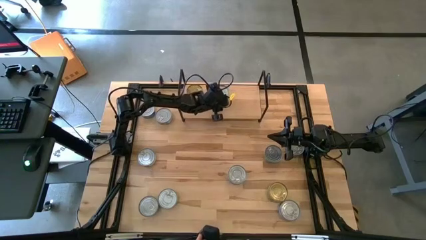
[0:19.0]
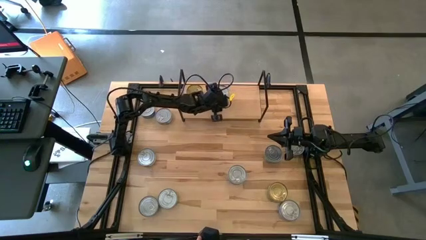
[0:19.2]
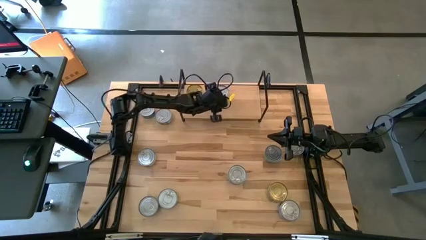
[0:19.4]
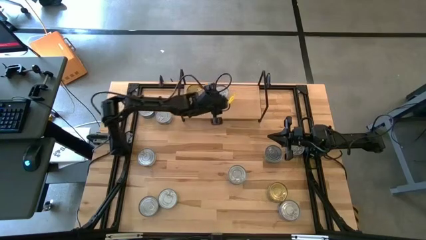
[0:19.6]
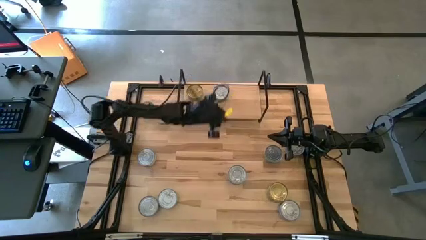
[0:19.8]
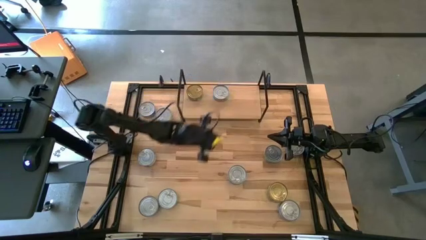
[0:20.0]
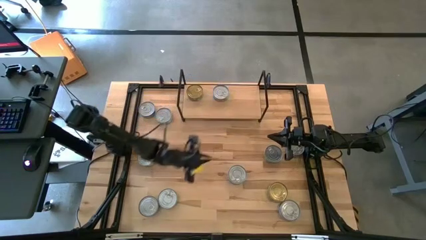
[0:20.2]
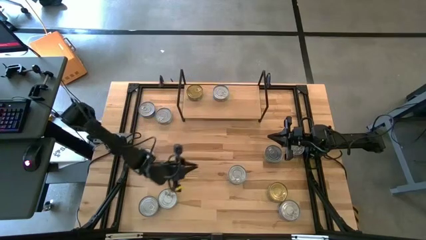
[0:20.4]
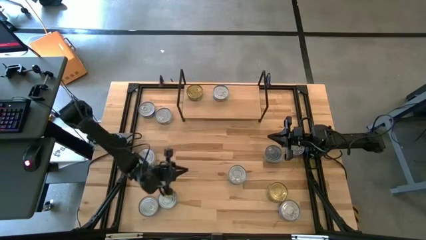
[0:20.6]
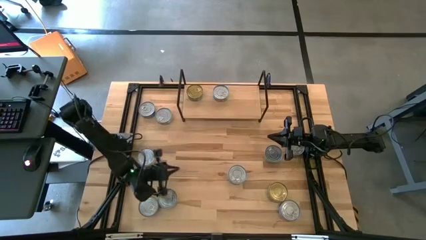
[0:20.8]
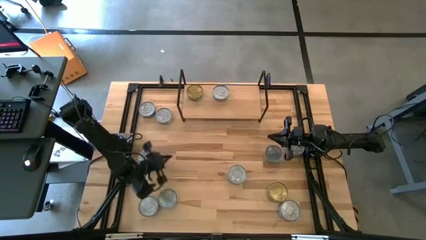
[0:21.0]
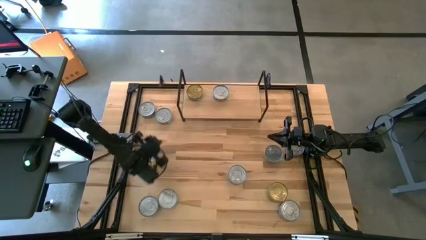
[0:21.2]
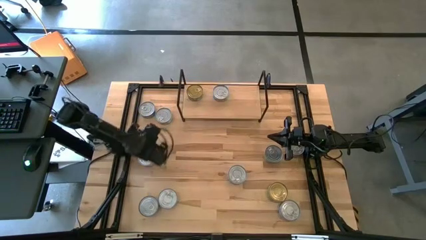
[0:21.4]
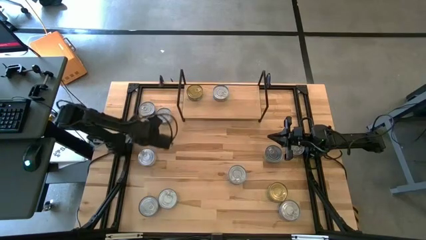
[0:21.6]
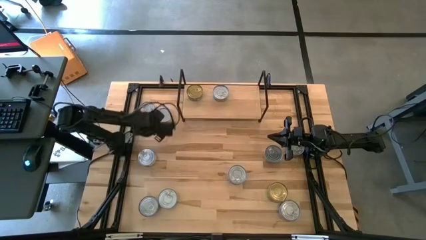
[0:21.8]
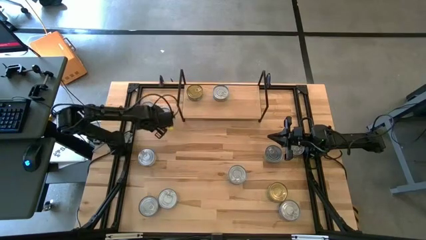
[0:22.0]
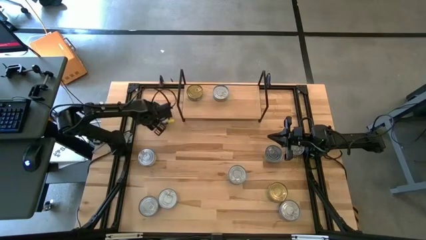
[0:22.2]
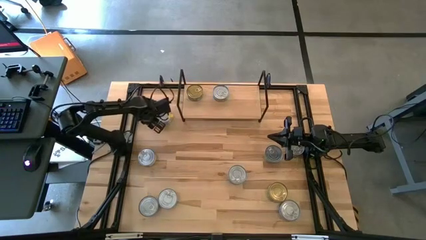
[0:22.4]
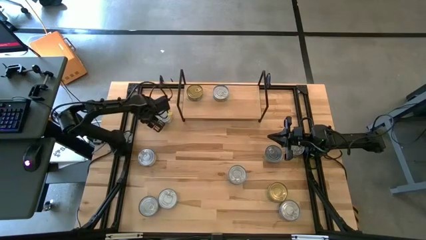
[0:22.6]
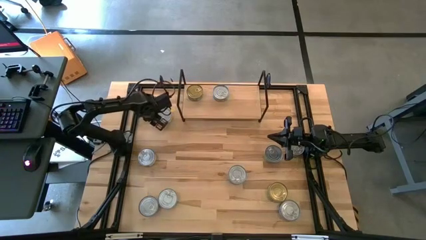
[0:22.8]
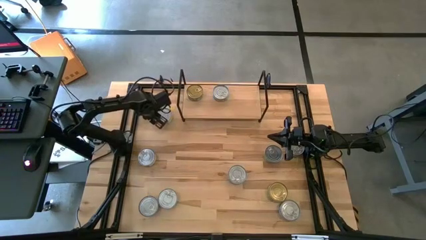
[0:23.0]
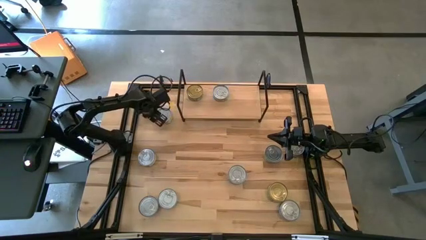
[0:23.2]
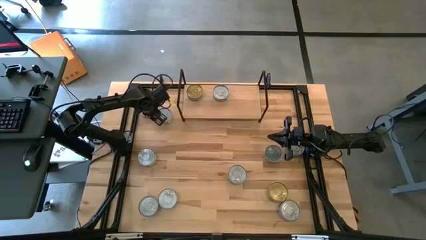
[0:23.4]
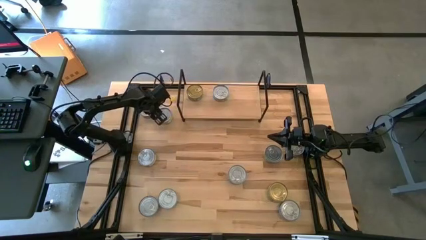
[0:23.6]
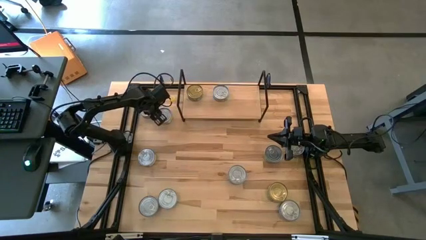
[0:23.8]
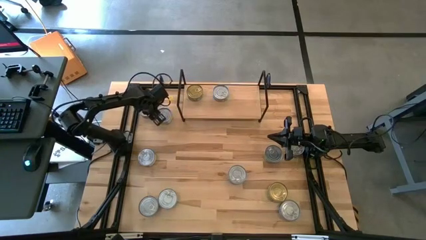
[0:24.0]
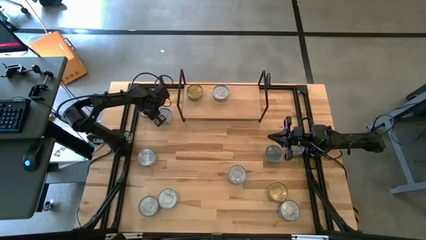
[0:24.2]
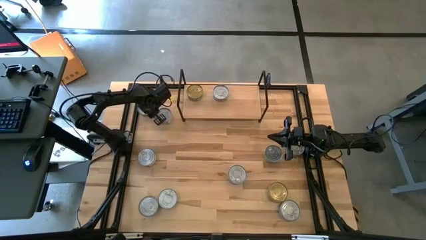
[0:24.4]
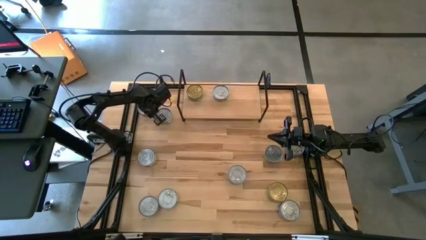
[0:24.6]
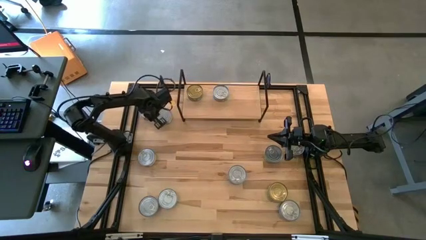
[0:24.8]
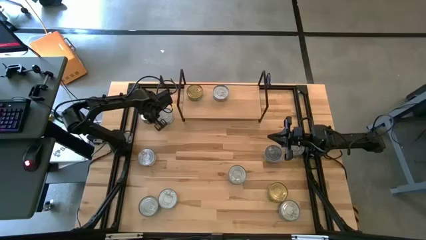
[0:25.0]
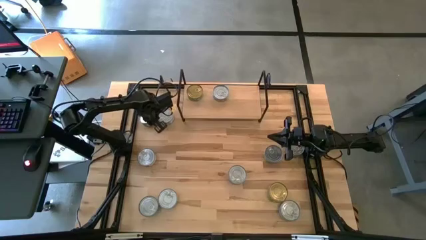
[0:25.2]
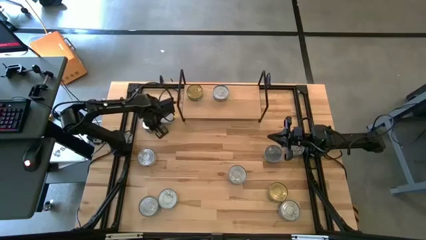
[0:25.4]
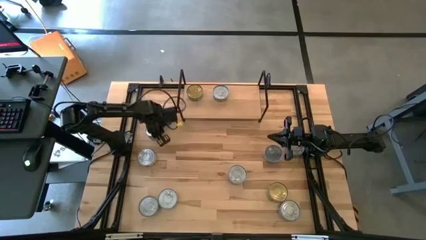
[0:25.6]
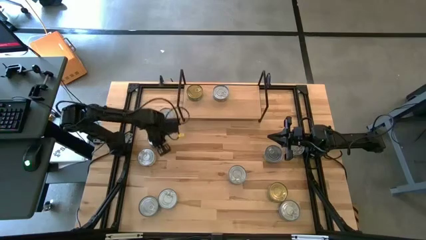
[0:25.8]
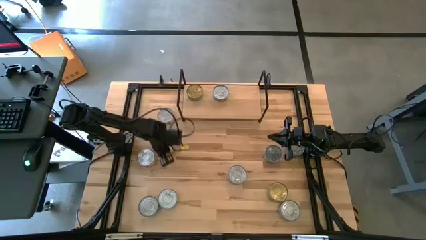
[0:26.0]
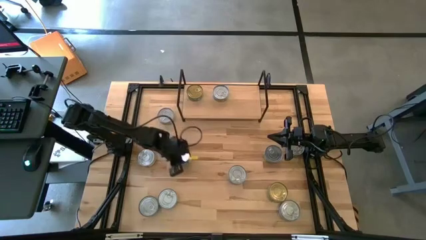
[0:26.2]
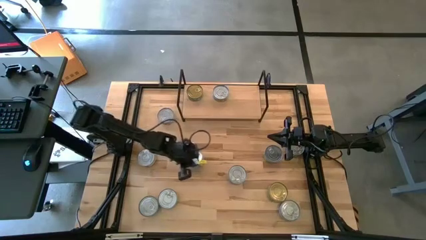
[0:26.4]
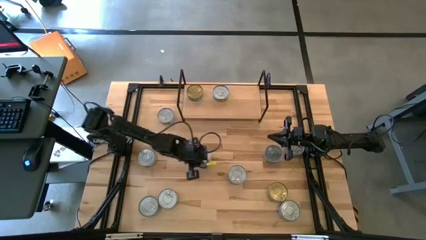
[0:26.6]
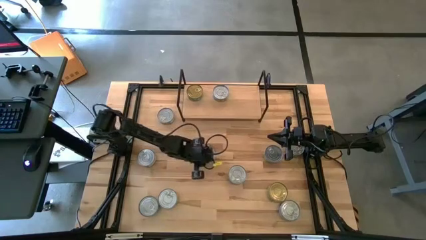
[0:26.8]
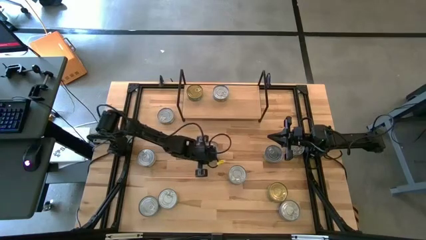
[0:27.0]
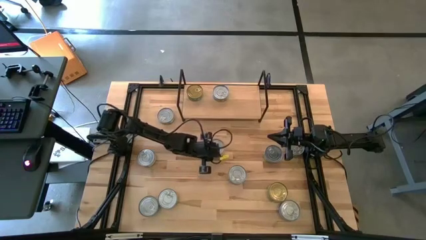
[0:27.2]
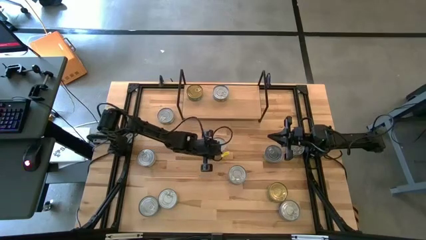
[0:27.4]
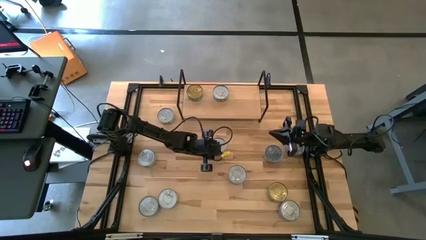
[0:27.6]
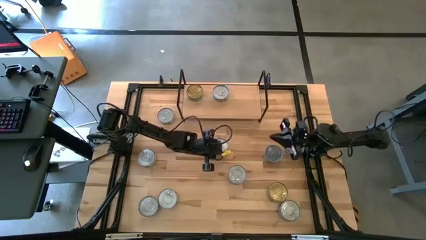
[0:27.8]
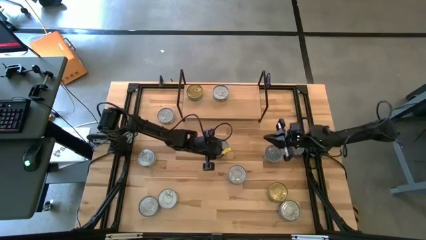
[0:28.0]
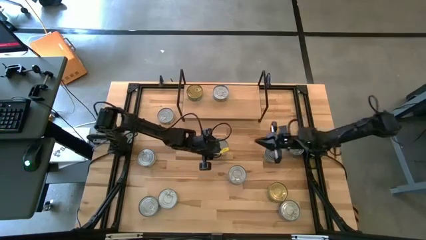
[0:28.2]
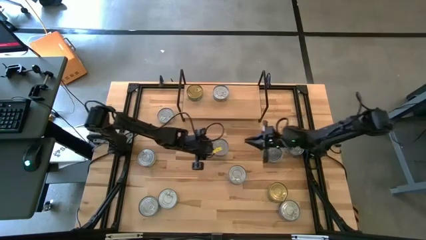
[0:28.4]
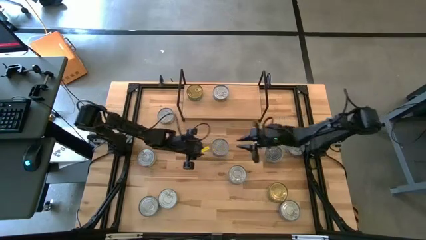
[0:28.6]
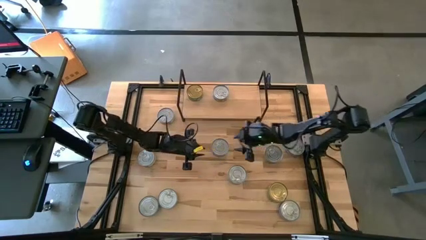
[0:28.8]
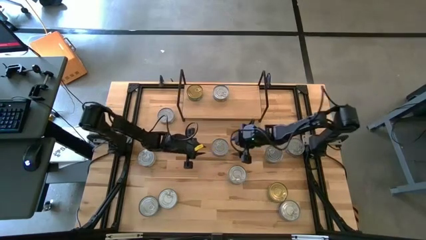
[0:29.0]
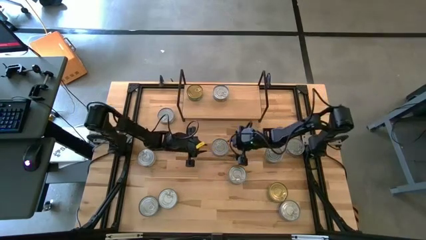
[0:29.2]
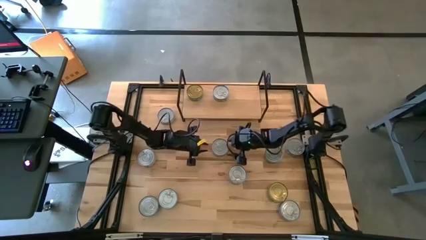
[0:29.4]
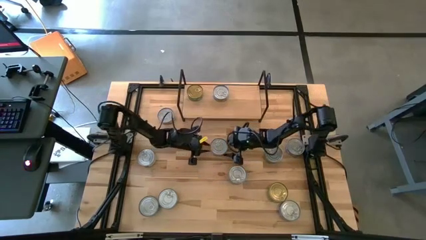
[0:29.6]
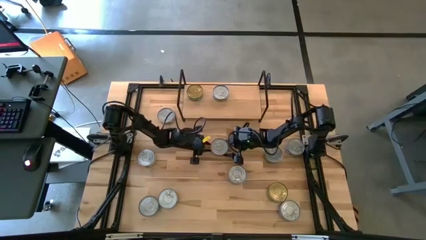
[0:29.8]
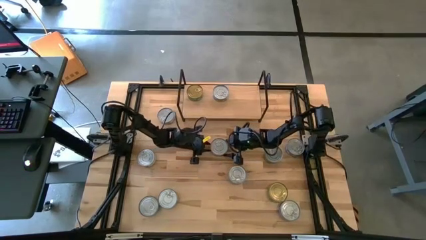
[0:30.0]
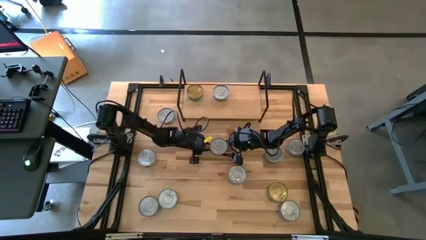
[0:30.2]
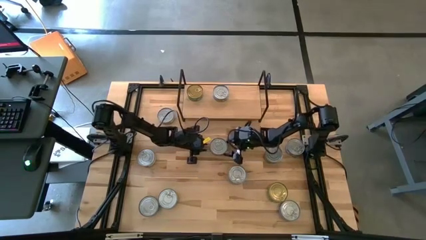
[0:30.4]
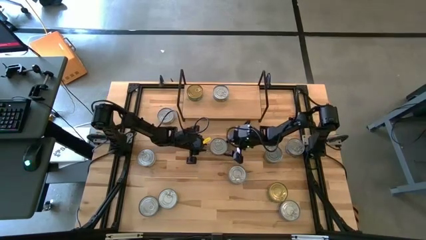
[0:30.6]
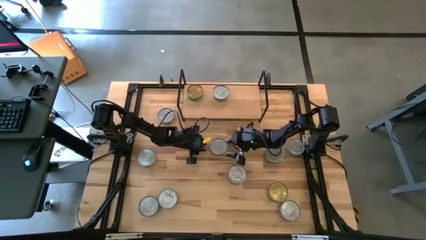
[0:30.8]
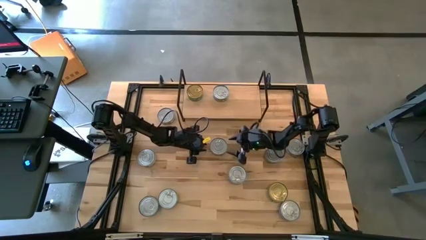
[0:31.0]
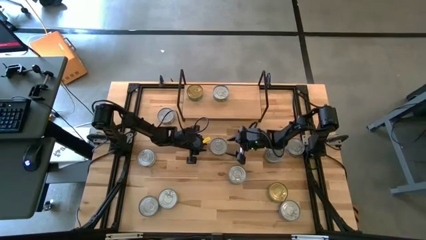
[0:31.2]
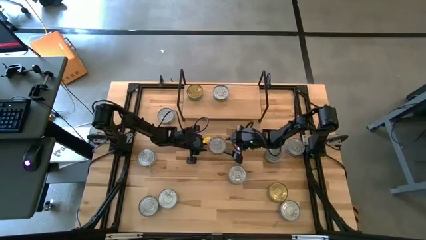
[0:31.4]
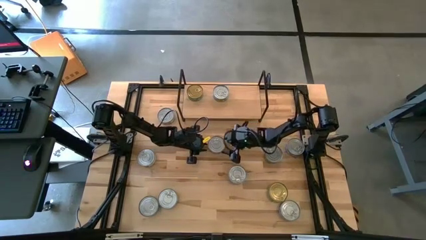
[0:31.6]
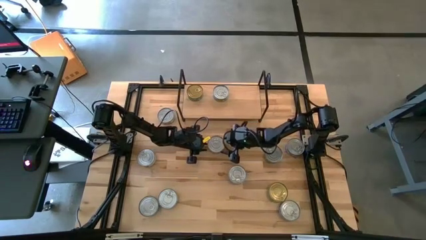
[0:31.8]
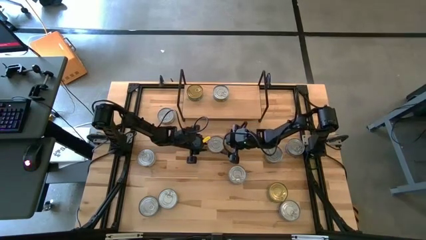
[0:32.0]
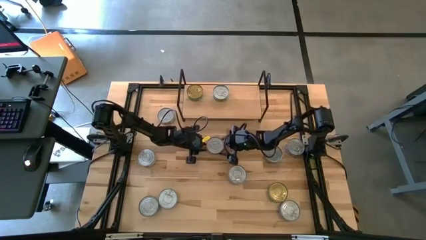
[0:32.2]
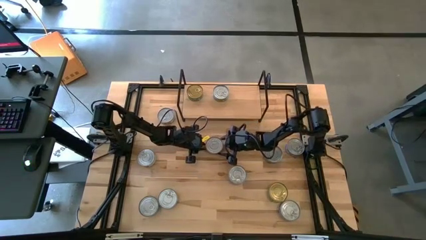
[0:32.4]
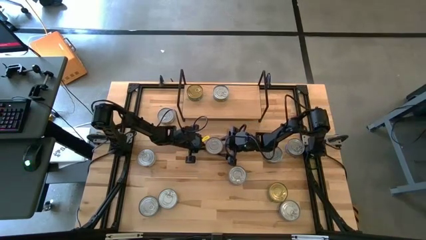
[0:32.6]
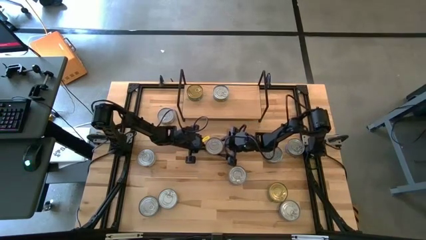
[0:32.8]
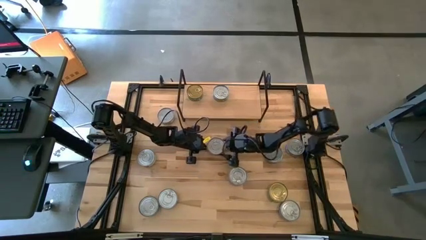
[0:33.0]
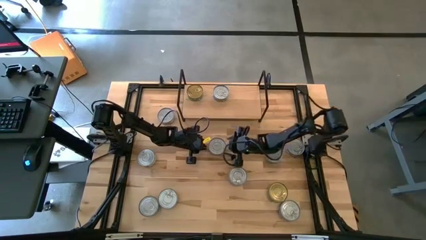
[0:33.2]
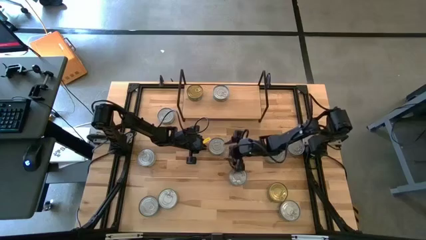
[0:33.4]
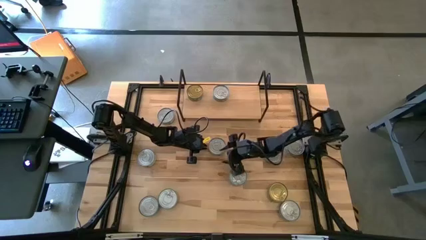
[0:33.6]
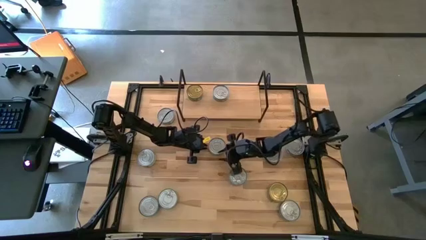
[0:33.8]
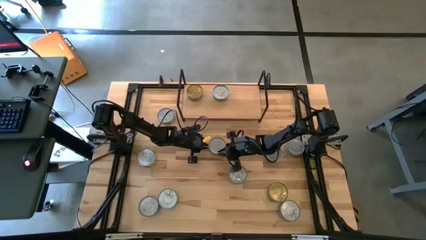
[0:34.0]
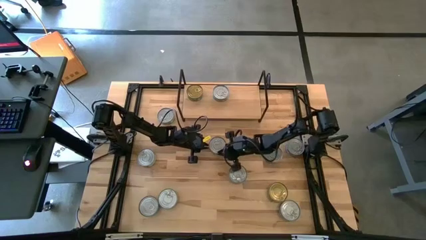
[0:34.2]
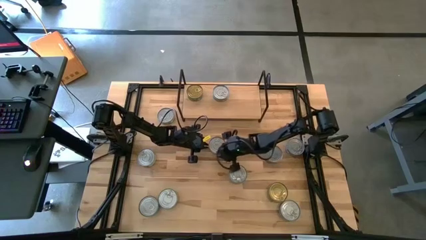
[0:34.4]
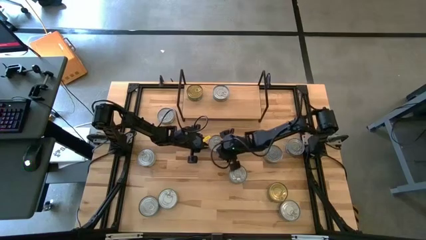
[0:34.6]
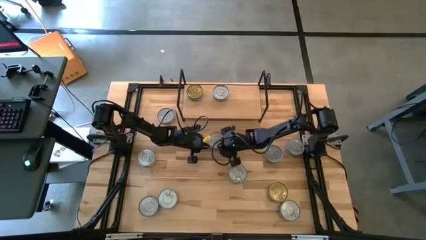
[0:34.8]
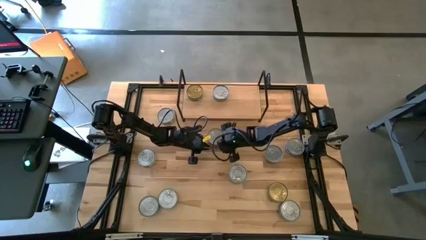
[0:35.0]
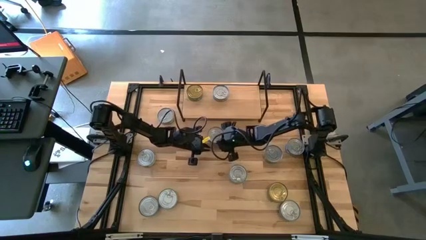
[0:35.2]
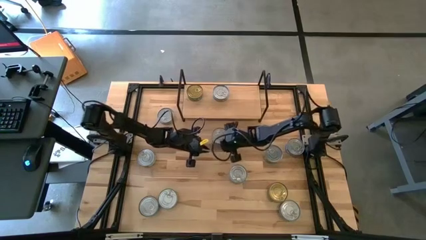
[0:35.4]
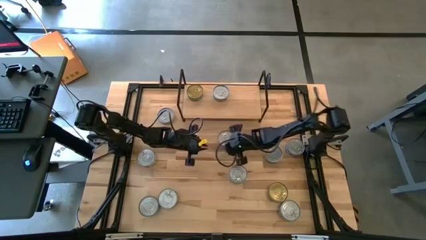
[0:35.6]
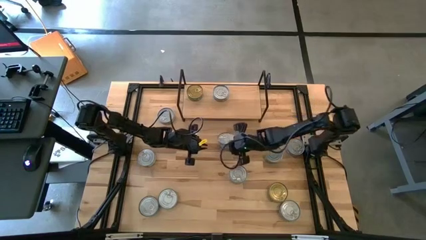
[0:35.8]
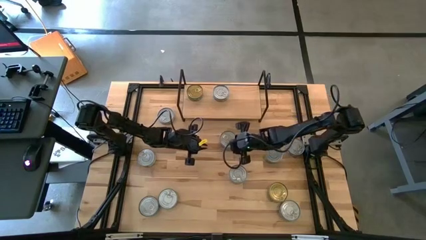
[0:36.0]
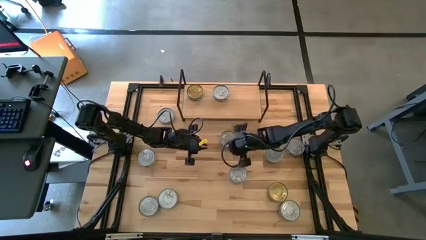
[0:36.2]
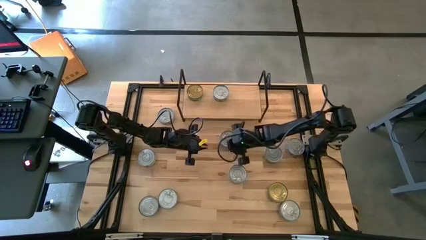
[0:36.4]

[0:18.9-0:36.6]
Task: Stack canned seafood by type on shelf
Put the blue tuna can on the shelf
